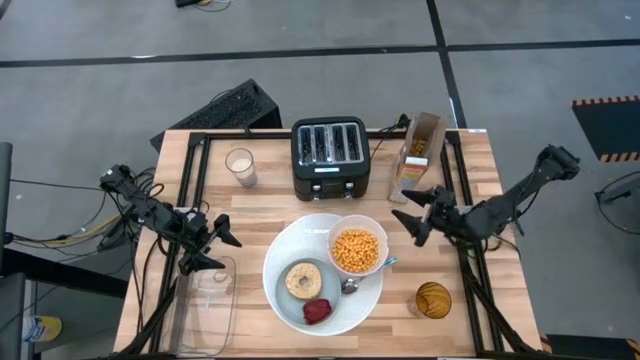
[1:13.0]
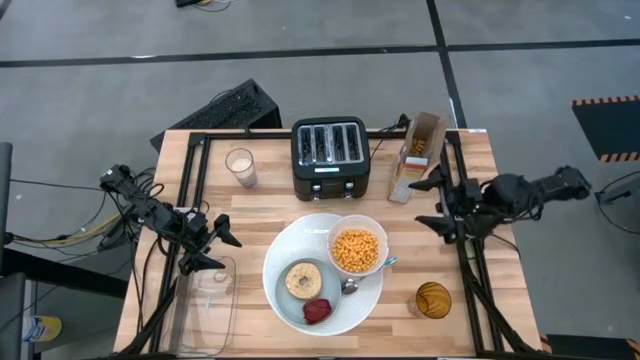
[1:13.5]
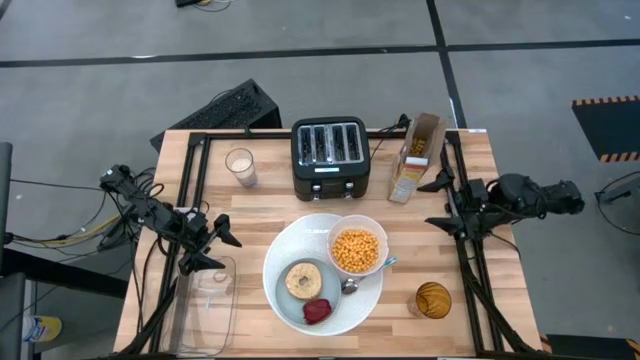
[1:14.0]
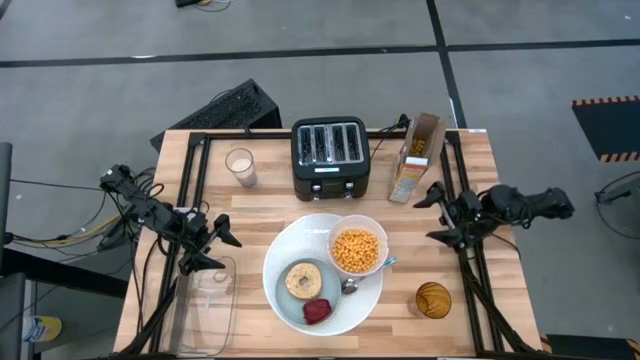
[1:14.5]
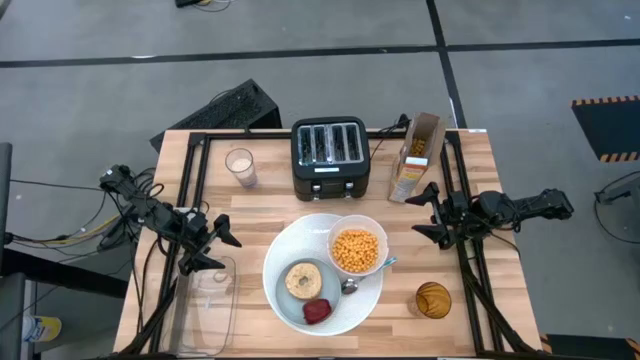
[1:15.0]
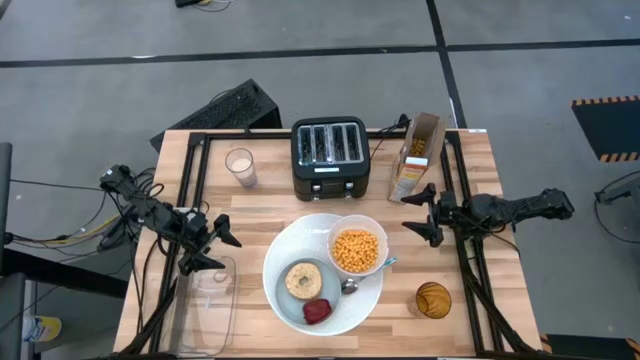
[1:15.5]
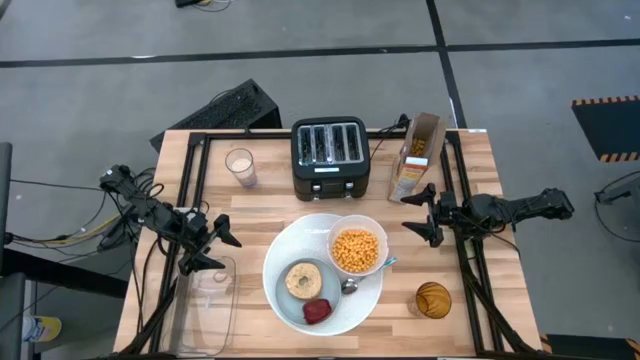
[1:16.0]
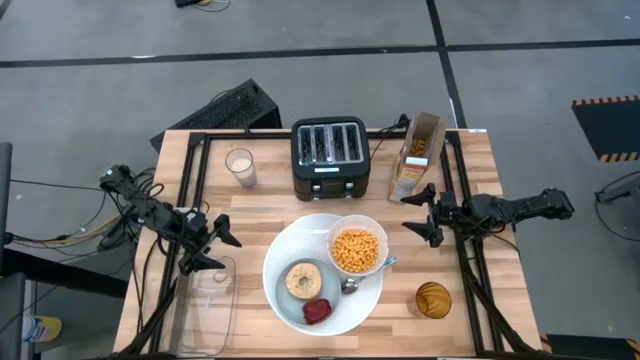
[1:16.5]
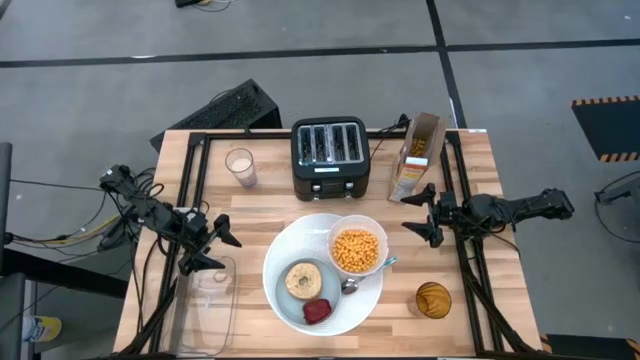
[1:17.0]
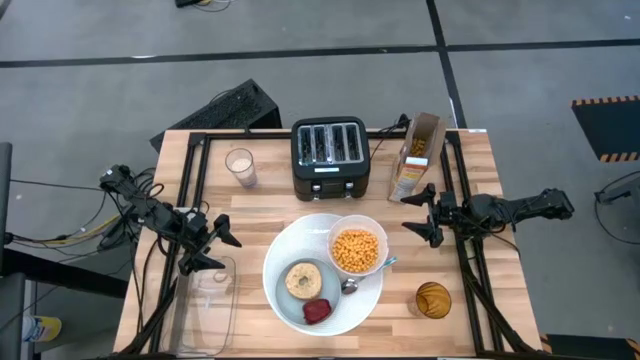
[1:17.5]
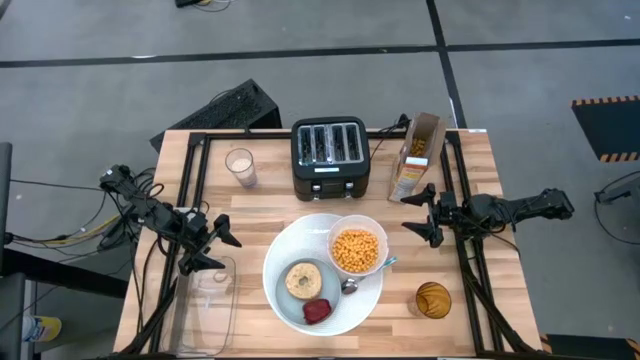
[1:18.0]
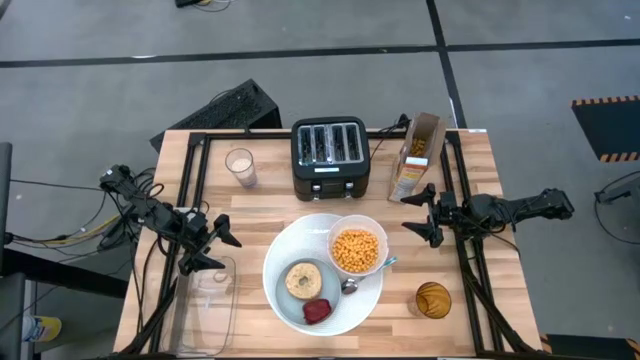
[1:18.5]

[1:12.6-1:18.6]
Task: Arrange a breakfast setting
Return to Home Position

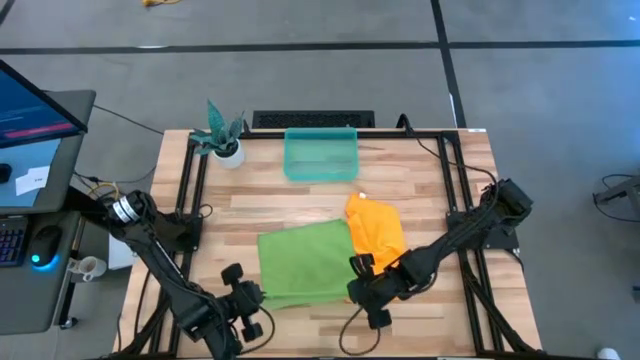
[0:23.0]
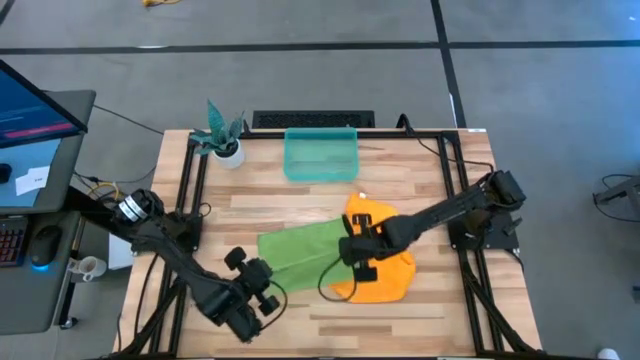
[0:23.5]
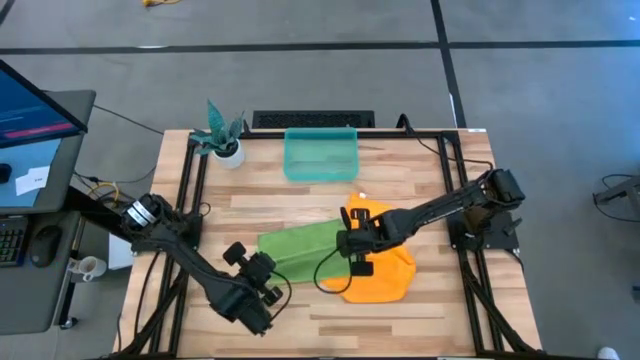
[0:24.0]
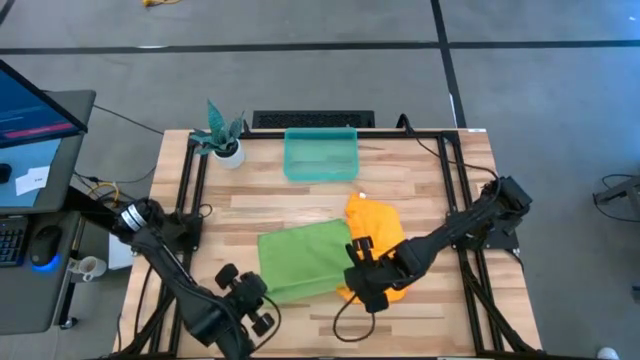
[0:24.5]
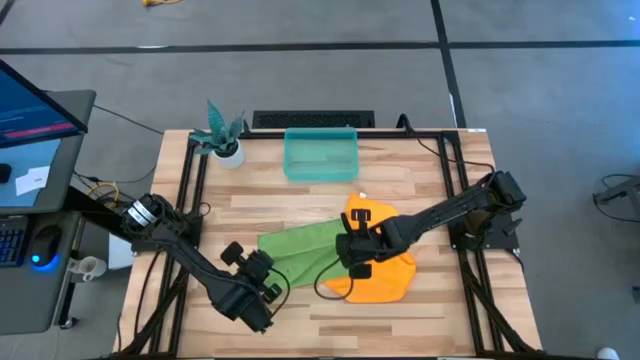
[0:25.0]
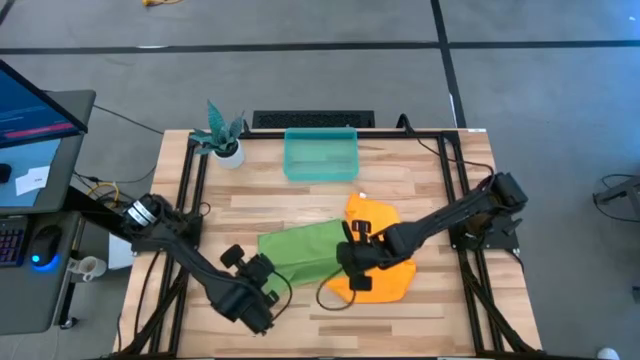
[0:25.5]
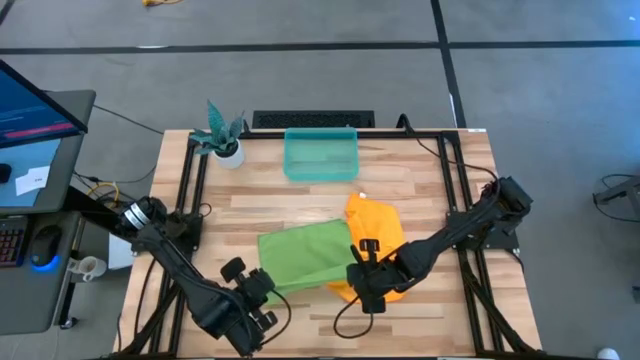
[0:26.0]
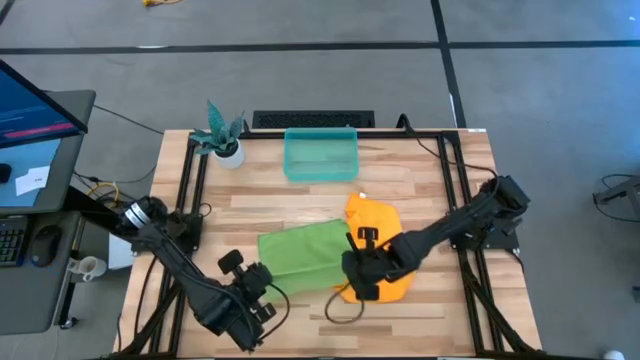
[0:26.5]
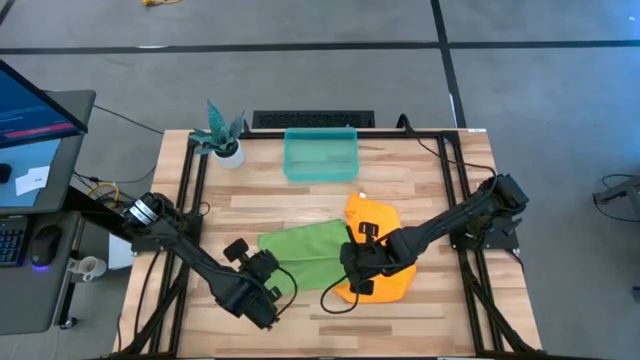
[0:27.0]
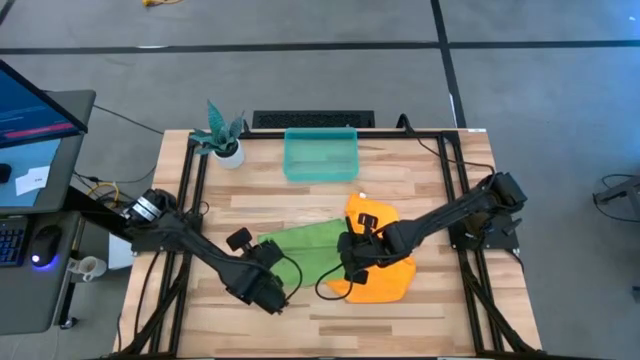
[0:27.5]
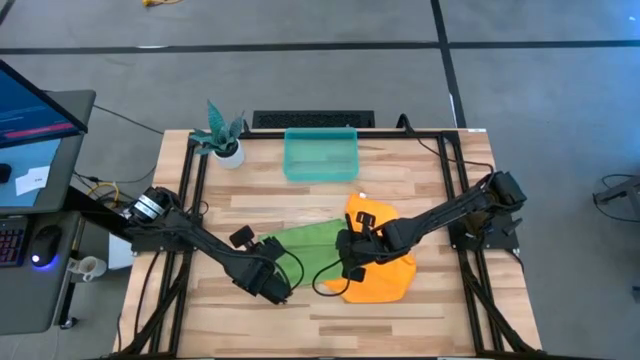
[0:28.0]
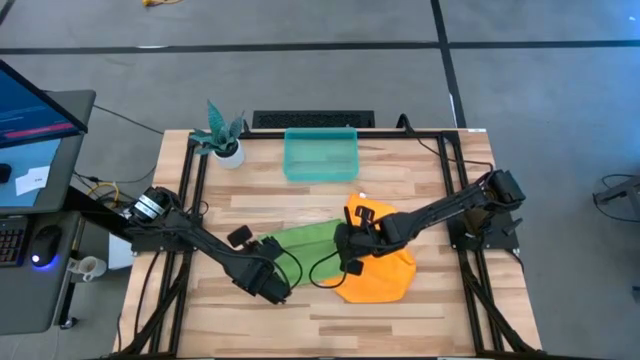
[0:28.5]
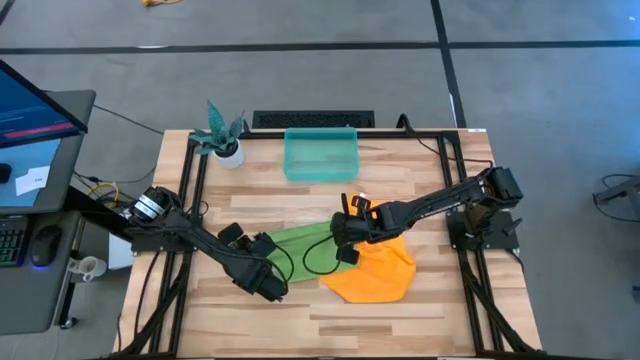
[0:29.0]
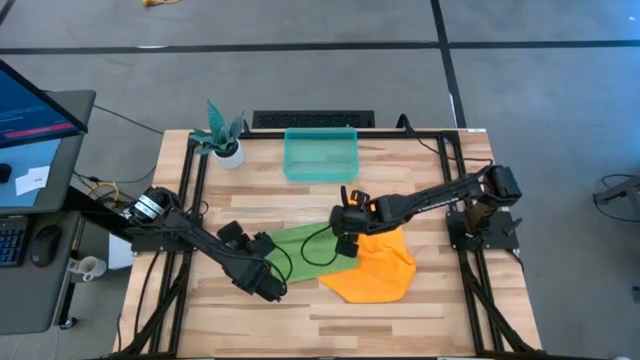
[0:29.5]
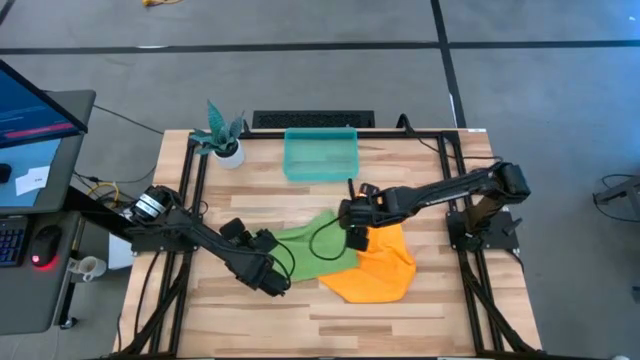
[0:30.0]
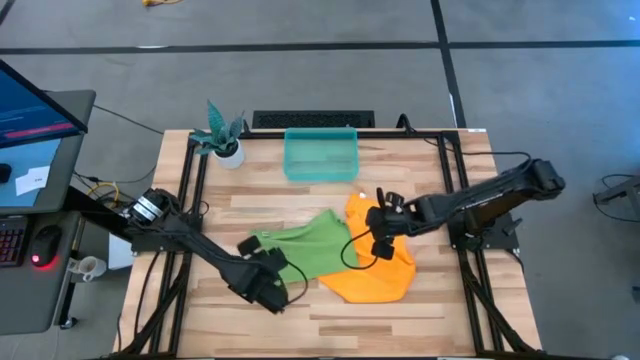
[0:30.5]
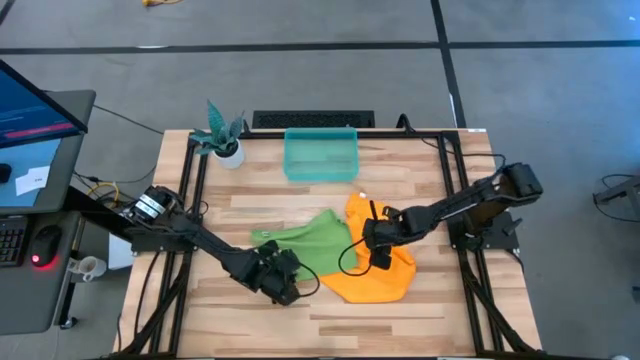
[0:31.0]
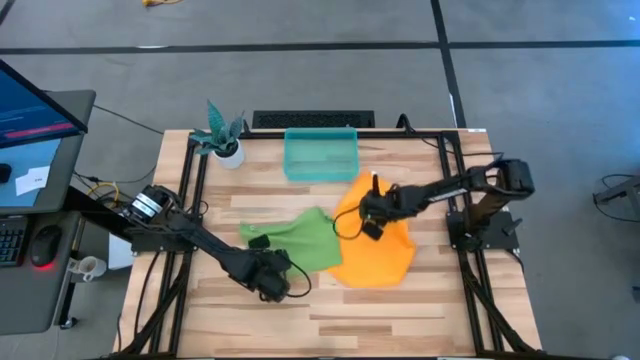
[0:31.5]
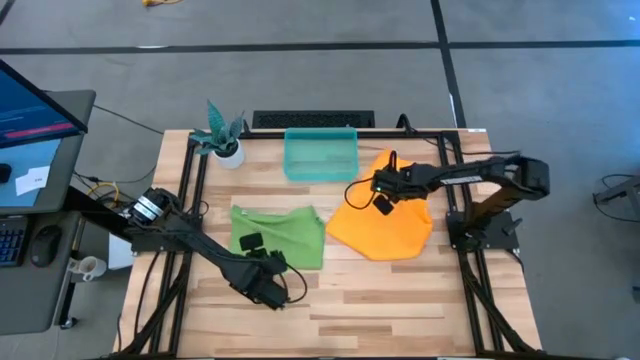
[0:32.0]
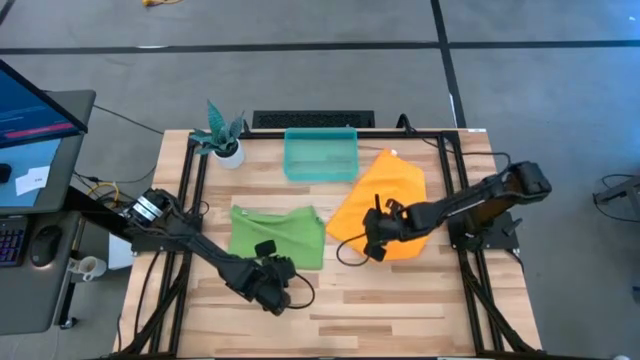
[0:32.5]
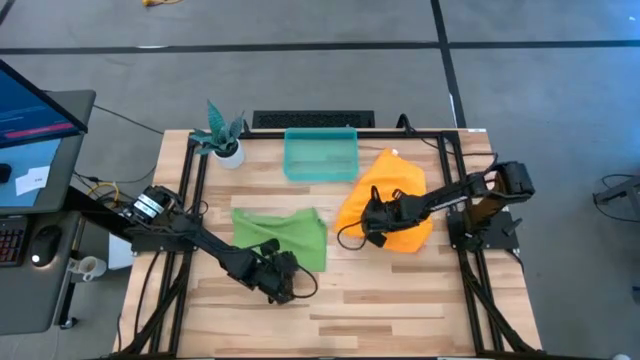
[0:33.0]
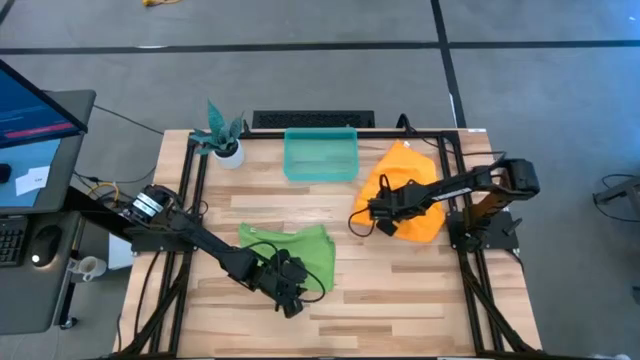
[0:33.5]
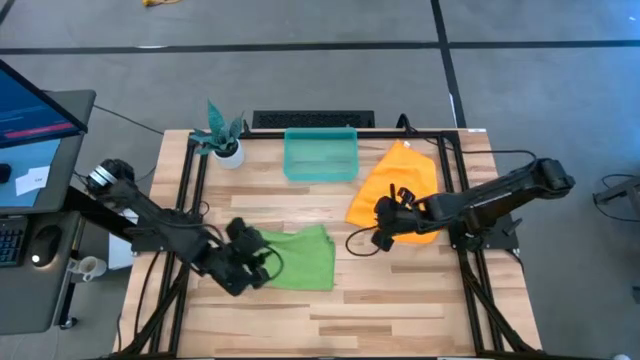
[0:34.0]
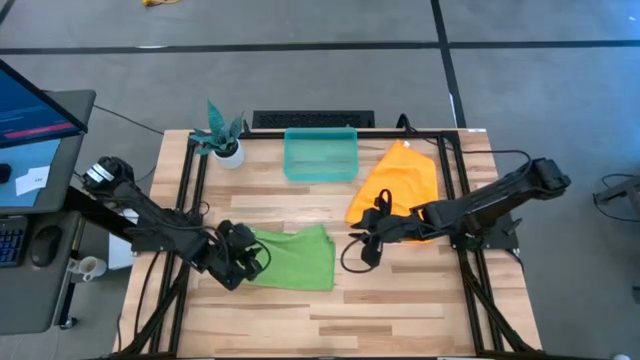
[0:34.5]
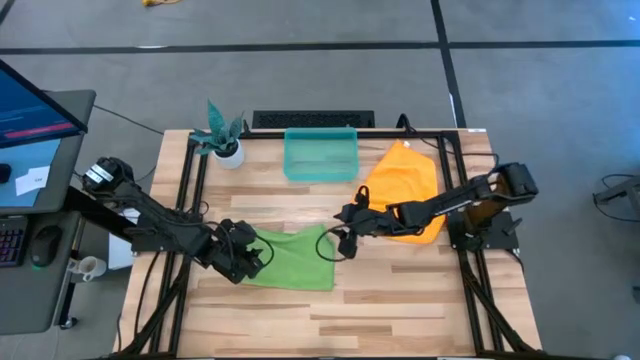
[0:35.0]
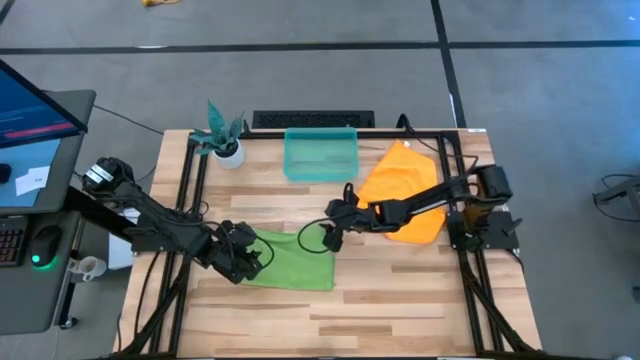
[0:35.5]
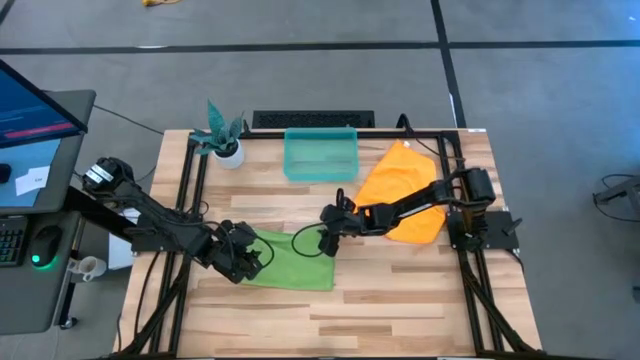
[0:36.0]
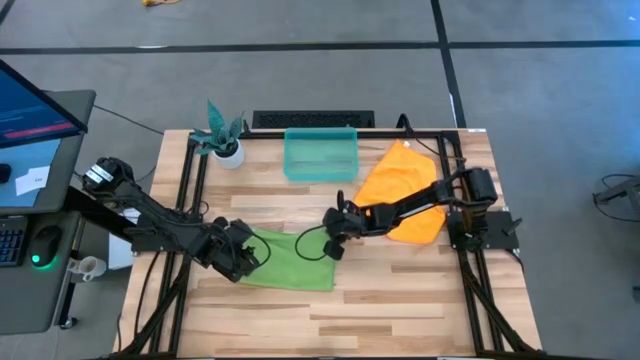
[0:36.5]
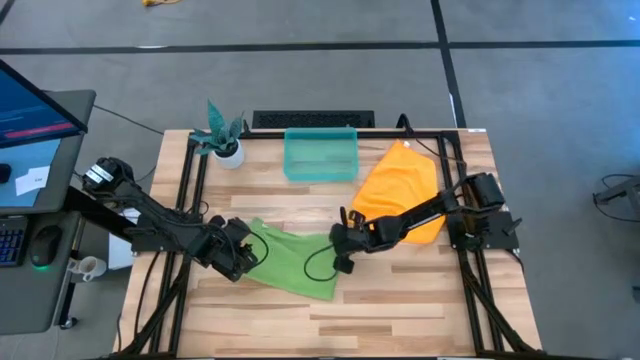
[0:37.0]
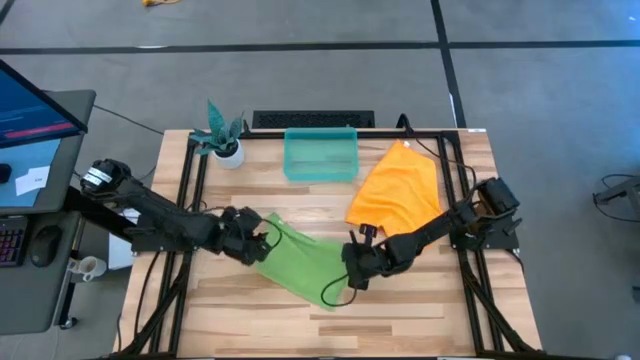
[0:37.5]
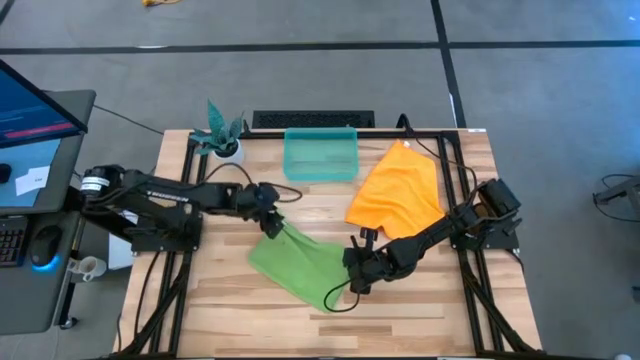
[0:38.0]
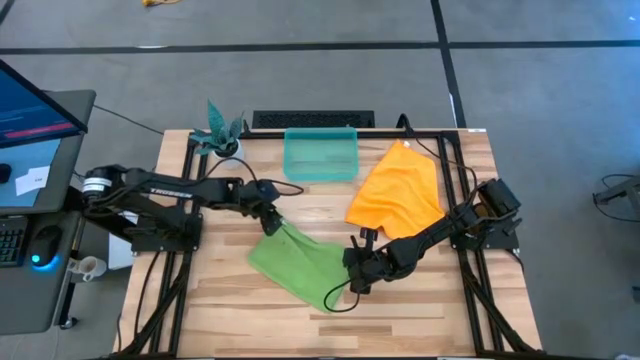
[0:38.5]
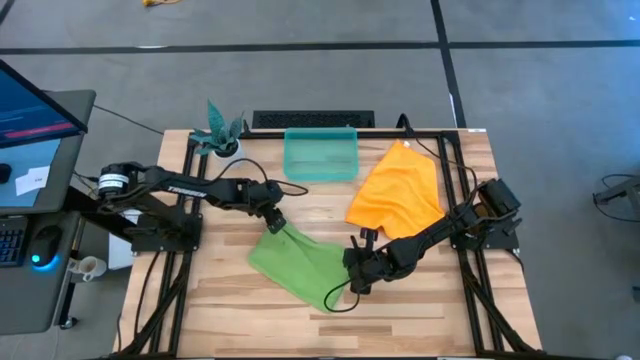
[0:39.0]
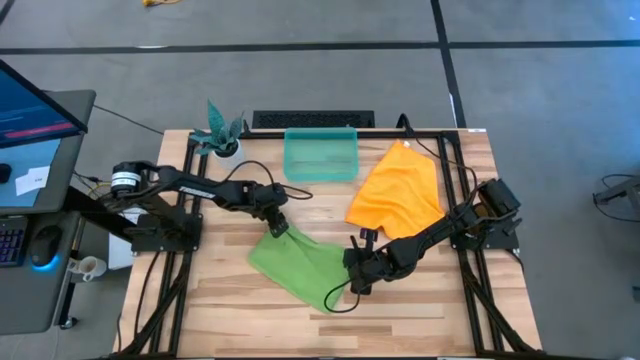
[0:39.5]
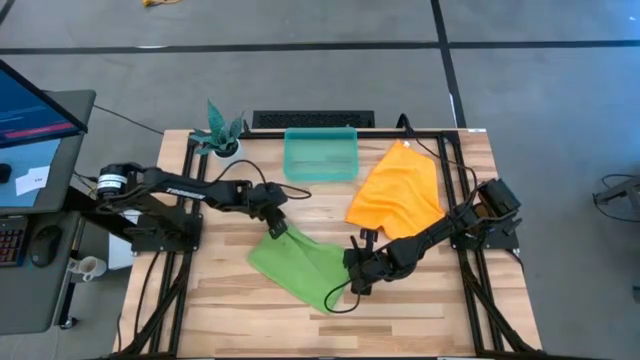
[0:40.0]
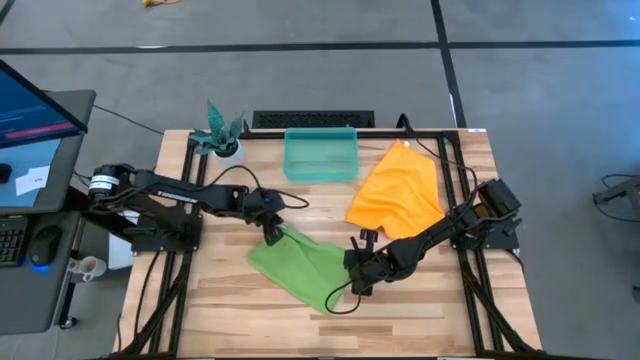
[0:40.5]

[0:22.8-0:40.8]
Task: Roll microfiber towels into tight, uniform cylinder then place into a basket
Fold the green towel
